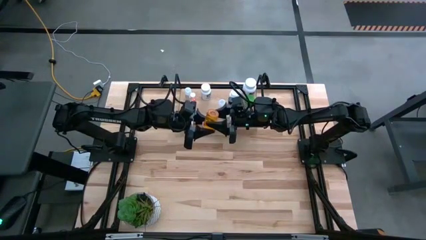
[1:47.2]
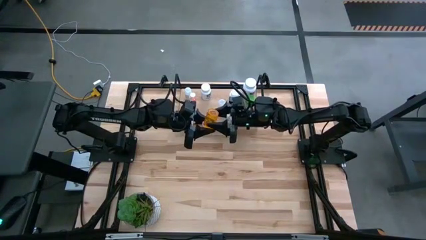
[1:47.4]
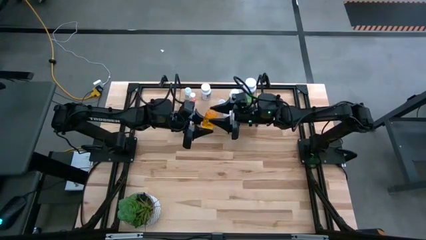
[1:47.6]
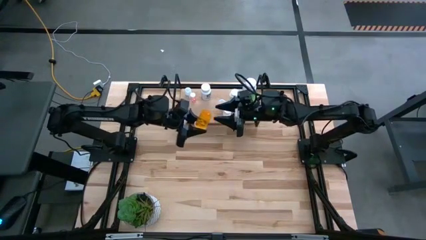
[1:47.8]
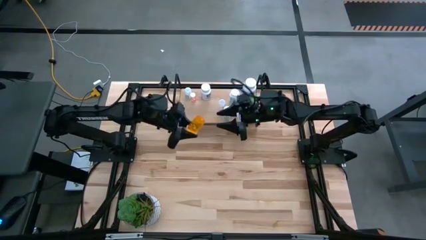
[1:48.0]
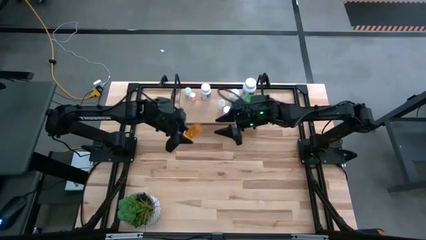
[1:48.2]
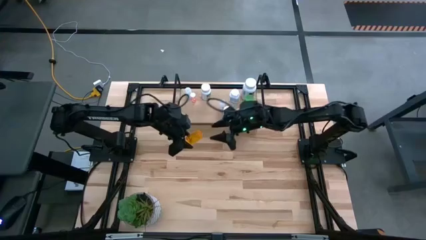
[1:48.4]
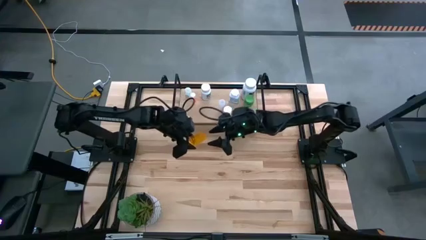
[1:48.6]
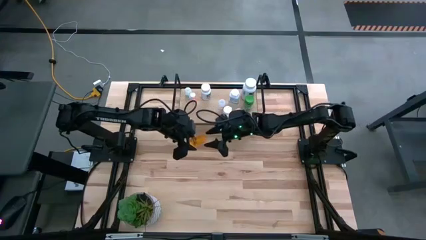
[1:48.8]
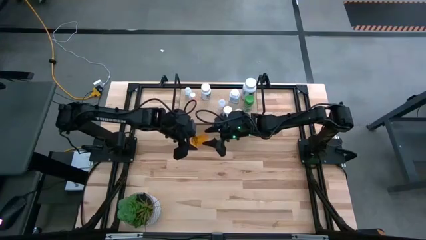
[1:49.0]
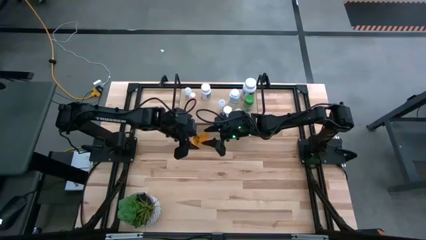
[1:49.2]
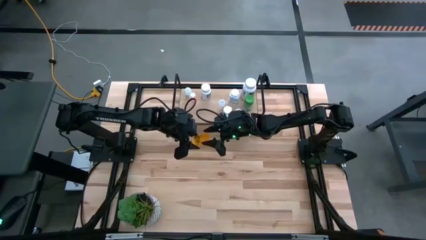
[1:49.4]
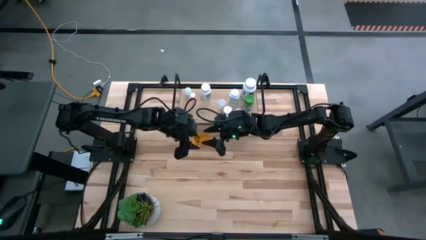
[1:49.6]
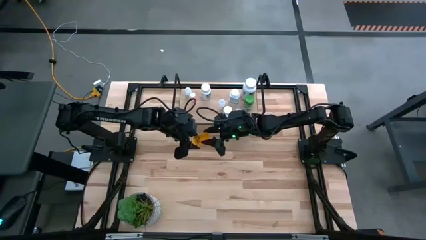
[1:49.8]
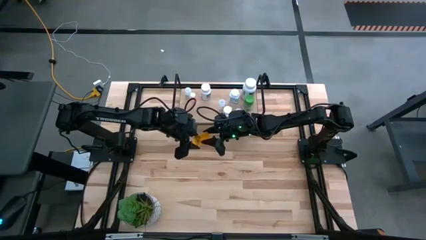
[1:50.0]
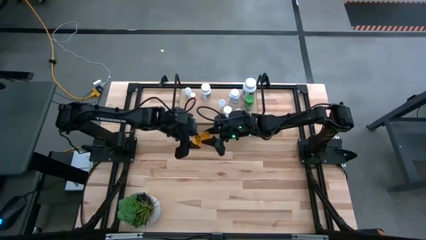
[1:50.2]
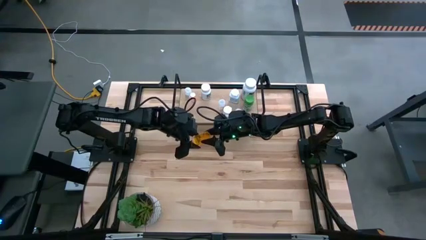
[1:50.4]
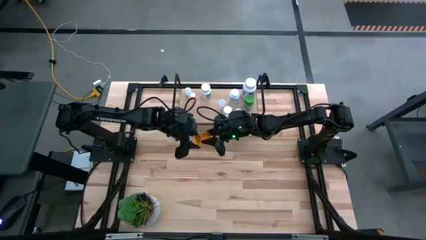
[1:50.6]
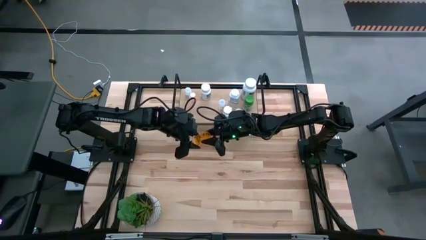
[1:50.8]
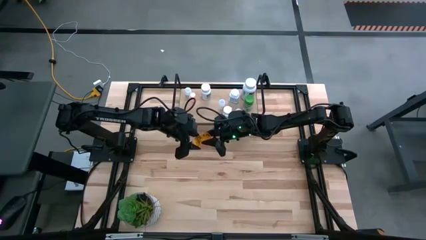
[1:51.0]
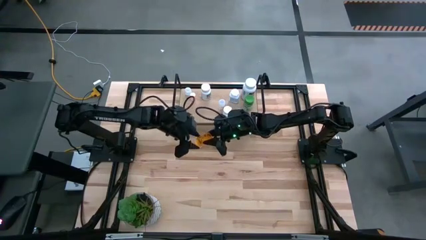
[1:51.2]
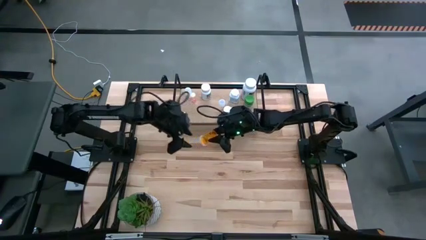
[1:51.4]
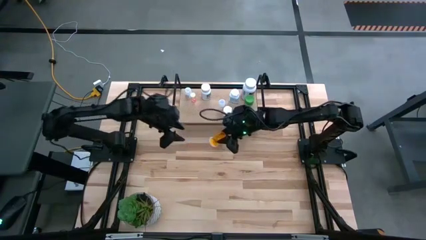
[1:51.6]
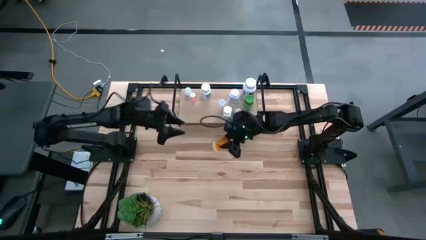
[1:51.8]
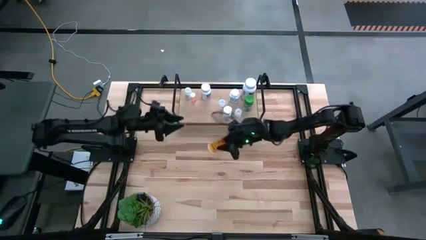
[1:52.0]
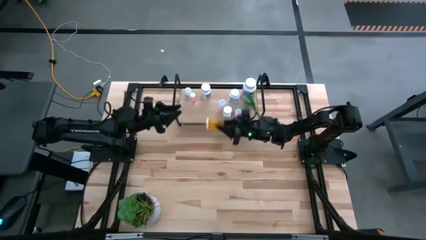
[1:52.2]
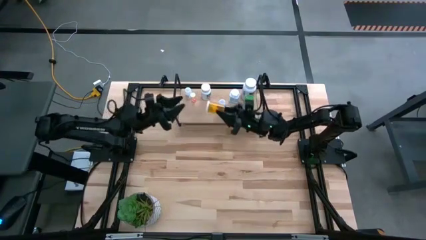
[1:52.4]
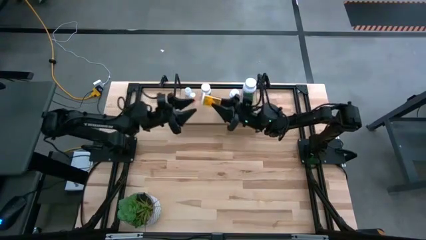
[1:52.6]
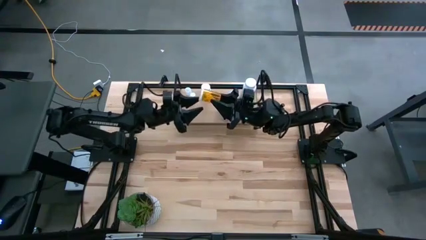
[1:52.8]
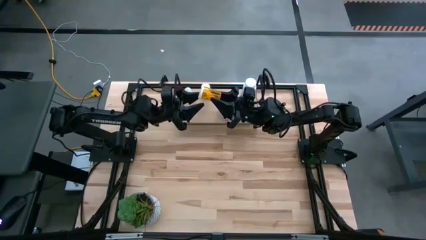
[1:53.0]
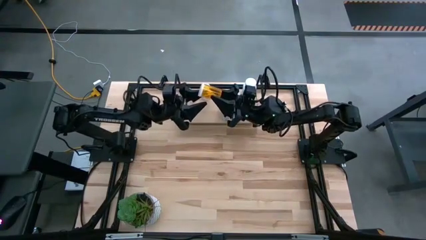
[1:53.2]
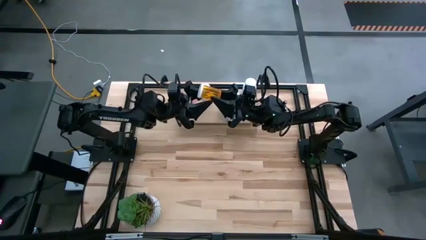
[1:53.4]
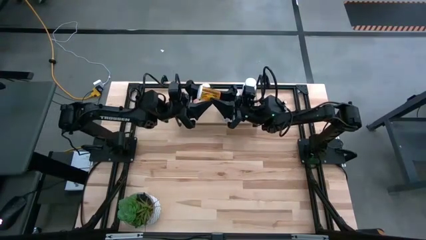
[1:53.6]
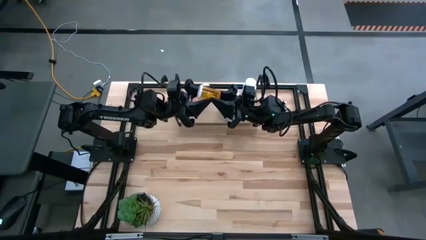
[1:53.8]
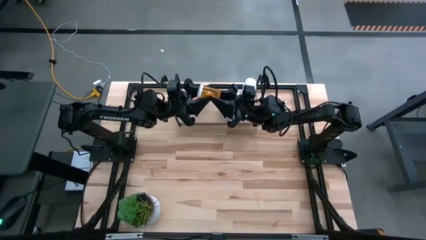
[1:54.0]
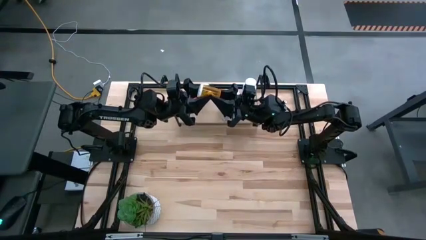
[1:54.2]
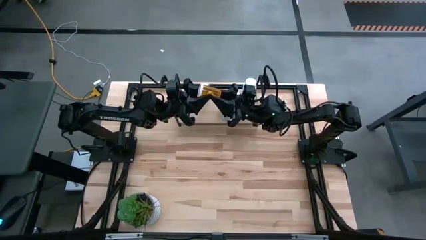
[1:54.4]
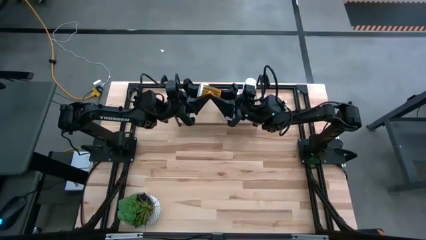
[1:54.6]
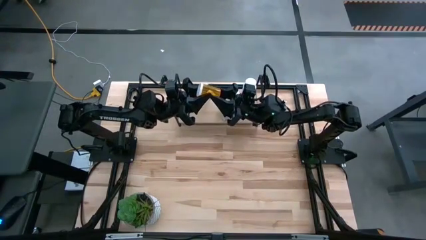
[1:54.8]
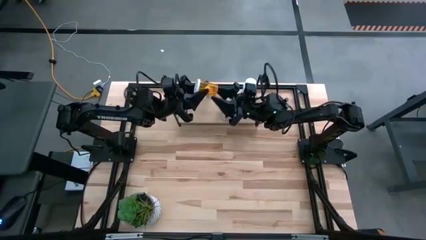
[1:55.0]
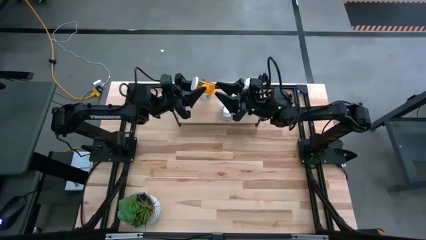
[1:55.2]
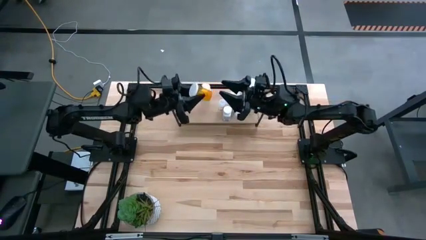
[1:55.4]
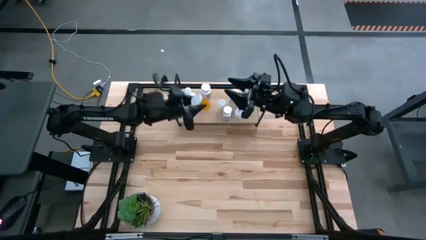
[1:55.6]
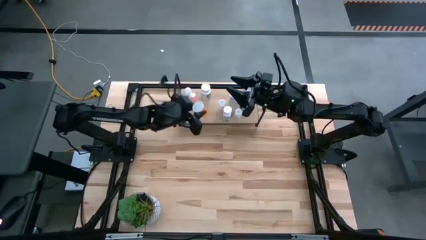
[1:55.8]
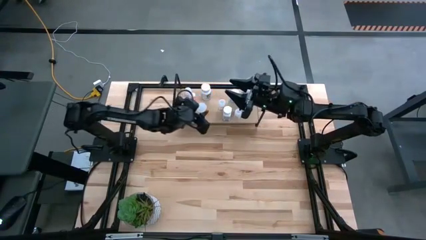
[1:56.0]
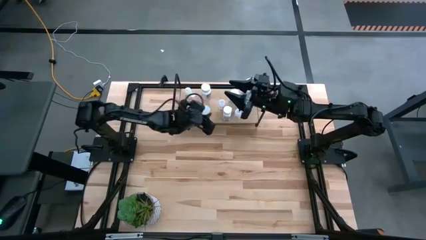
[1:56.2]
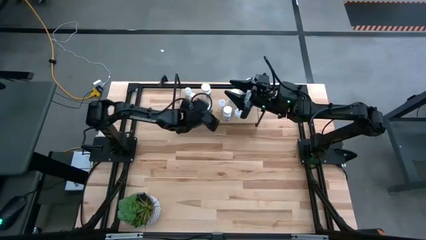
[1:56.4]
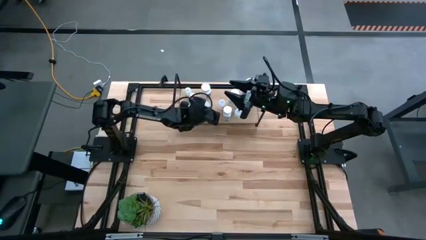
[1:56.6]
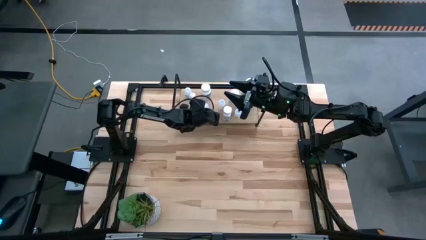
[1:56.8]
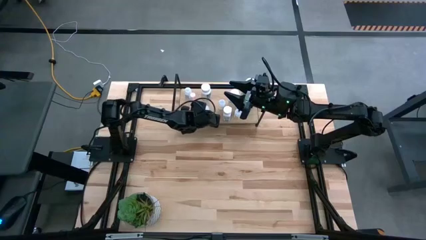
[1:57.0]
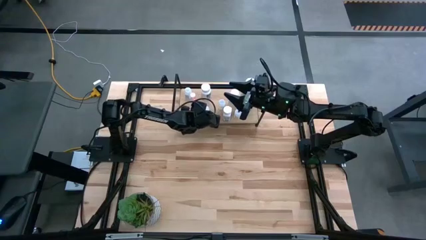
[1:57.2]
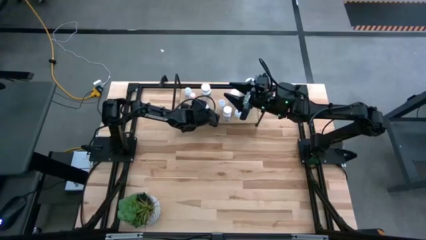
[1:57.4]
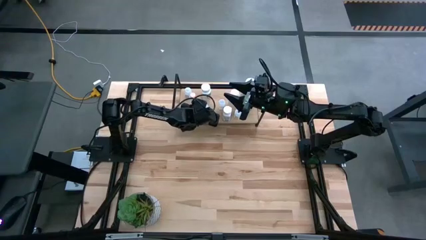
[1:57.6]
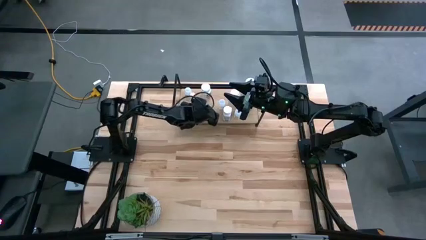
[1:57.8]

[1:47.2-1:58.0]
Task: Pick and place medicine bottles onto shelf by color
Put the orange pill bottle on the shelf
